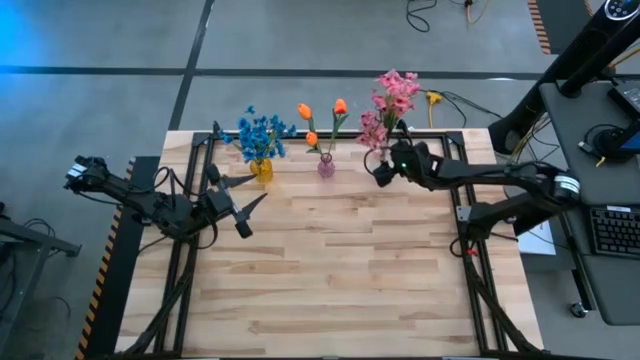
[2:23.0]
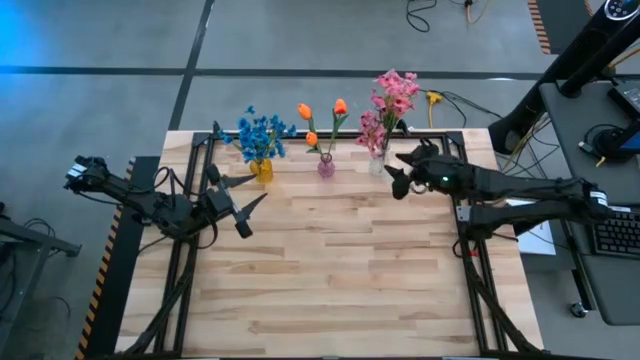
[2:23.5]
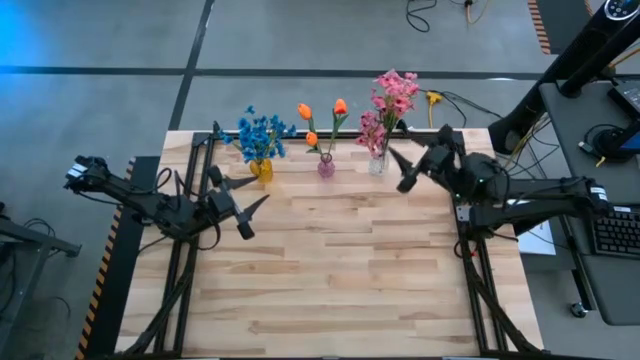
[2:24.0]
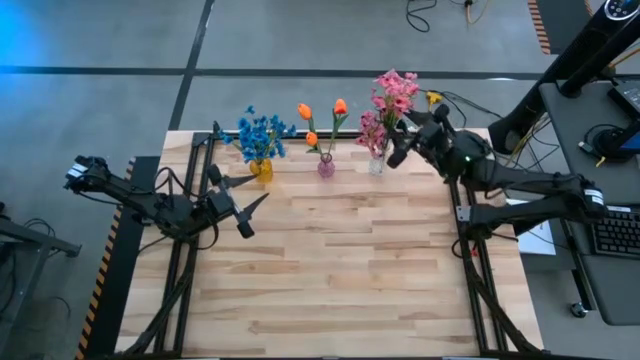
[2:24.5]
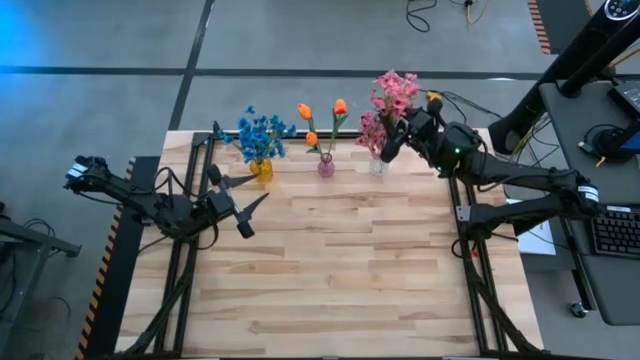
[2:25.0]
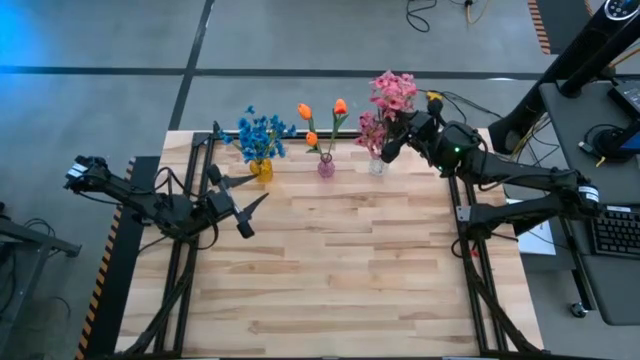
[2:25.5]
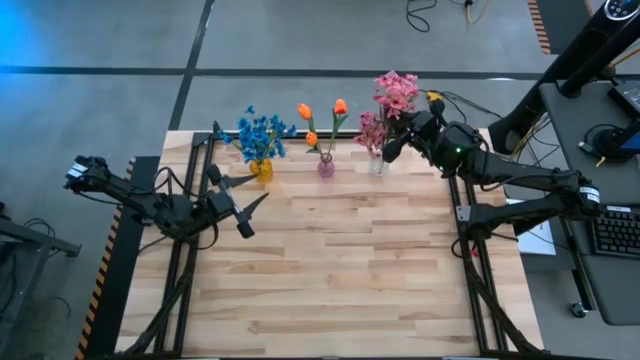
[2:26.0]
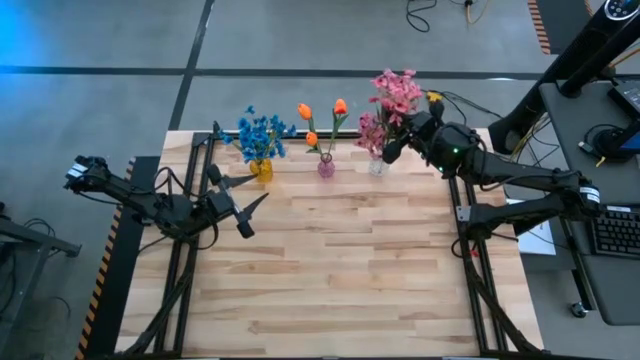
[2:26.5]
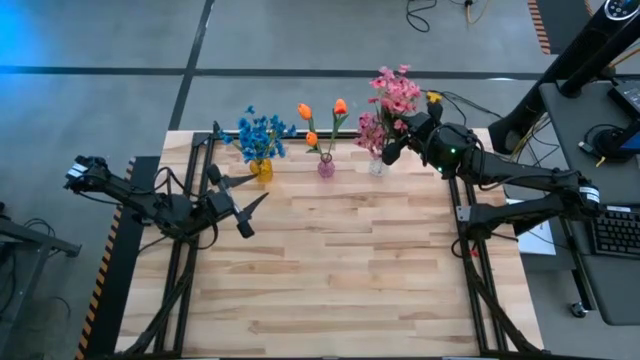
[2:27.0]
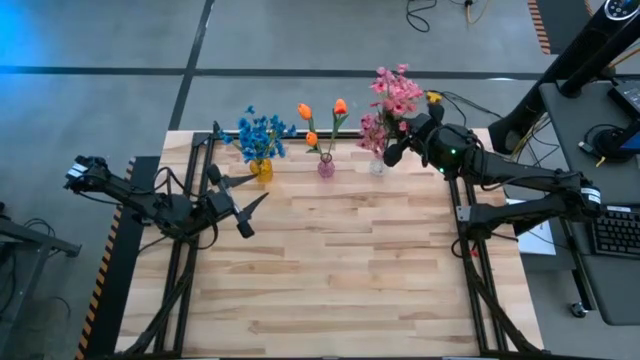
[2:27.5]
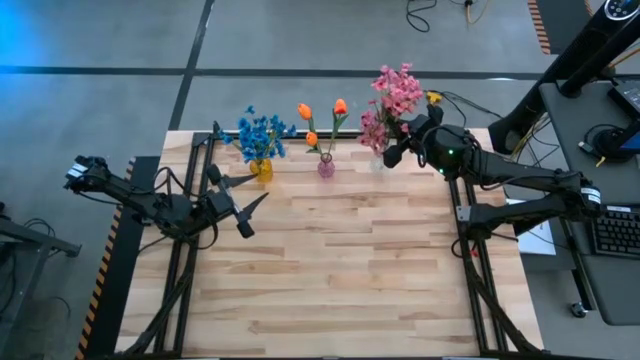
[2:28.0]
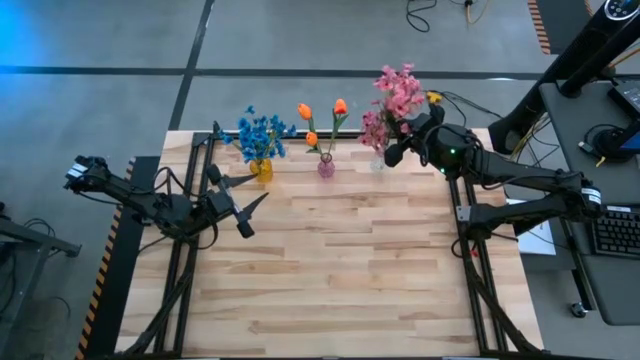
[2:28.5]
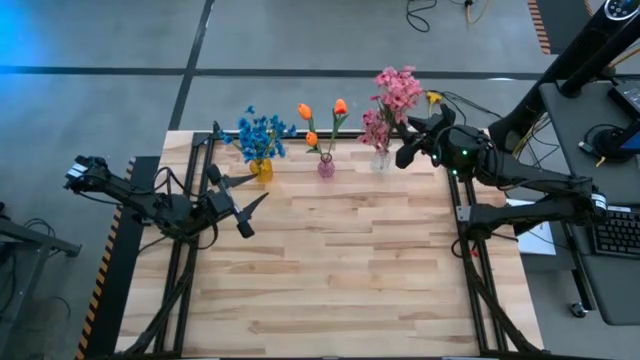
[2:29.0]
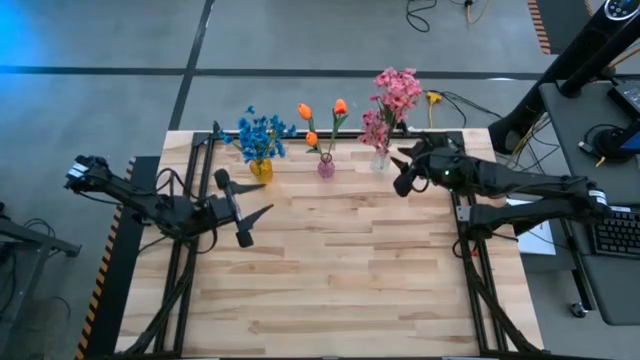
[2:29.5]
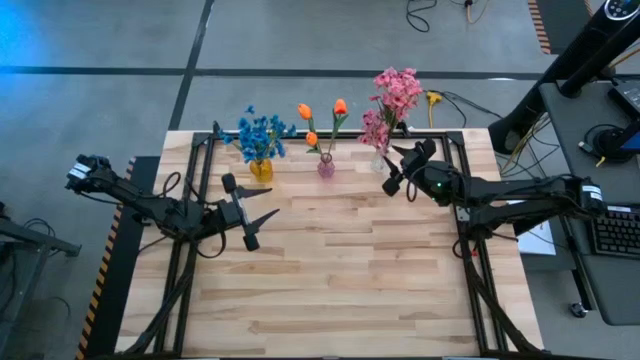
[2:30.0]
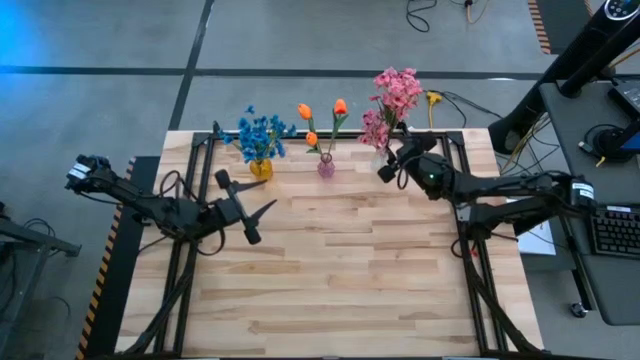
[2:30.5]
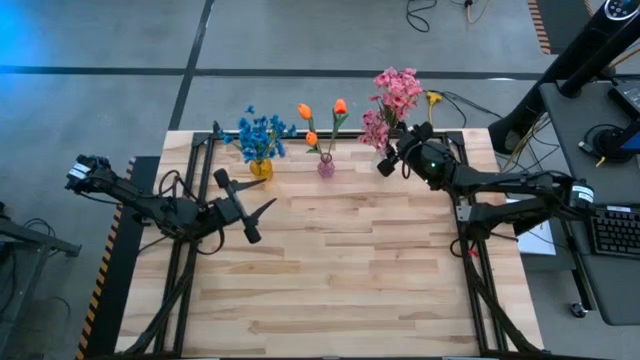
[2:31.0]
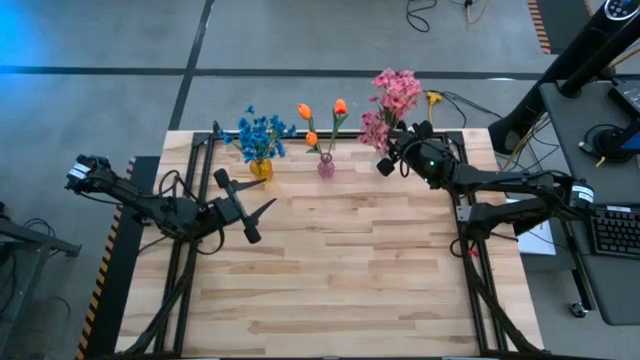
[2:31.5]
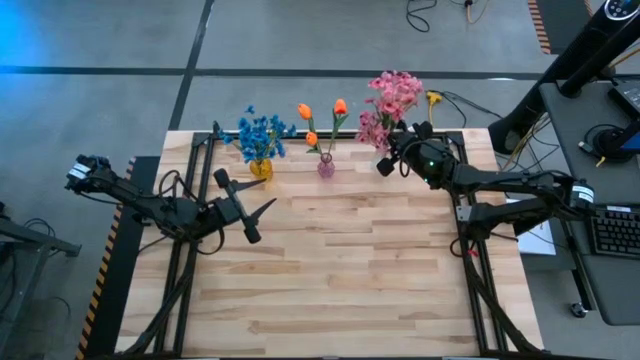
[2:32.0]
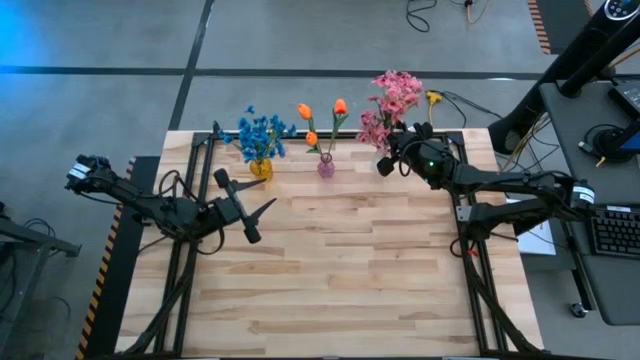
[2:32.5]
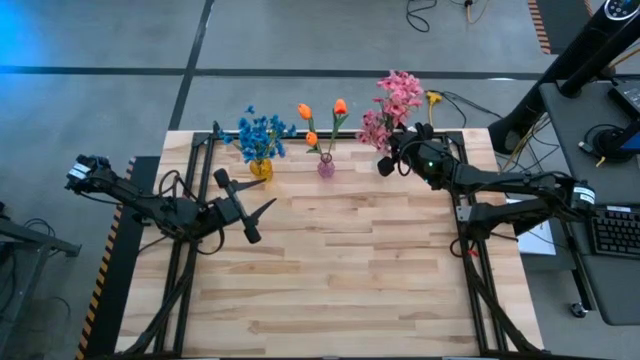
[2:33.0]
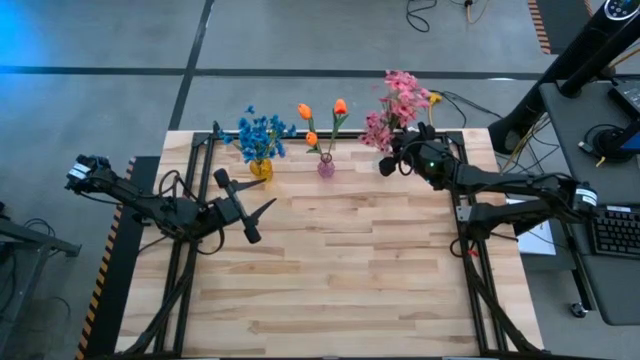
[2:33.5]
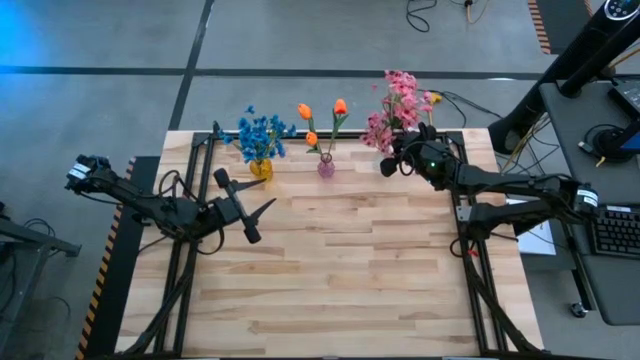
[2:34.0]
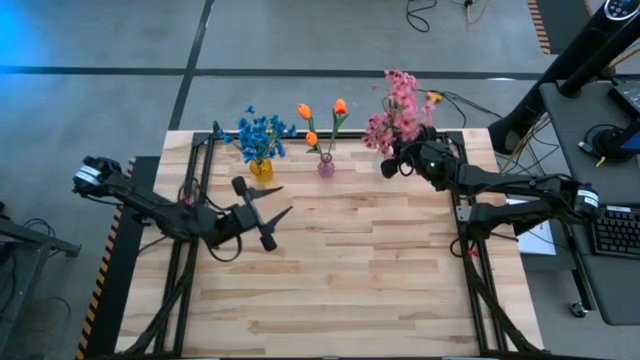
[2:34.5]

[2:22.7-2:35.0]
Task: Sort flowers into vase by color
Adjust the pink flowers

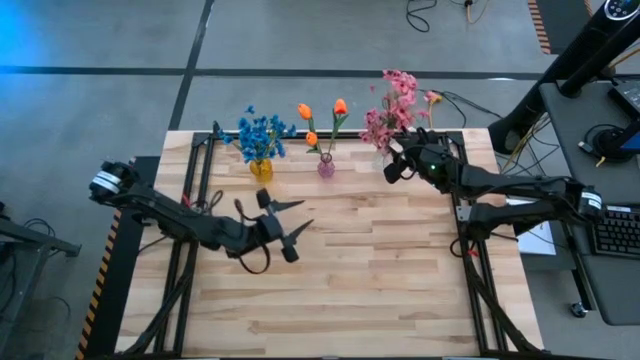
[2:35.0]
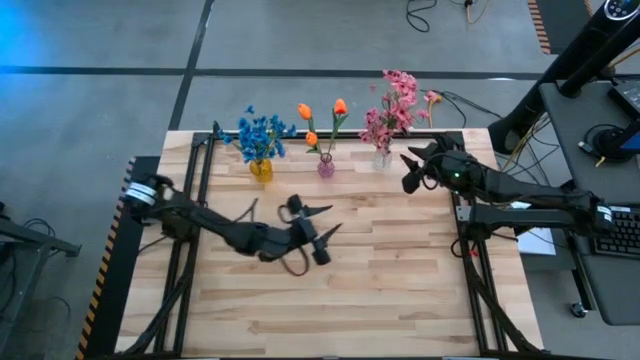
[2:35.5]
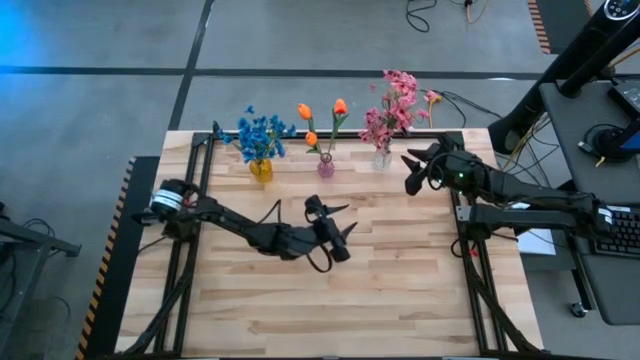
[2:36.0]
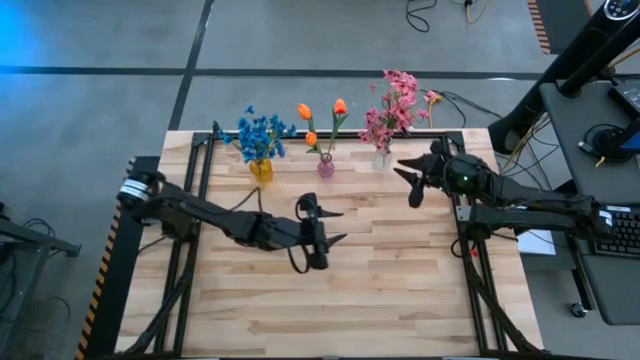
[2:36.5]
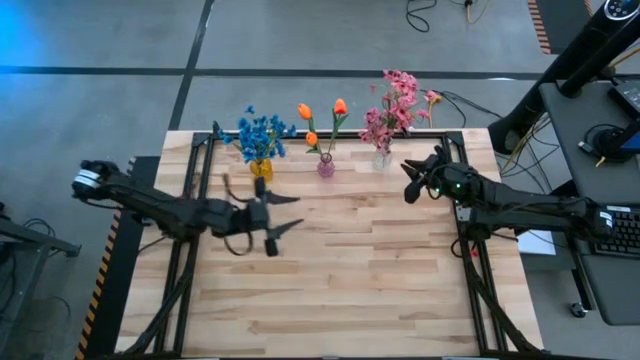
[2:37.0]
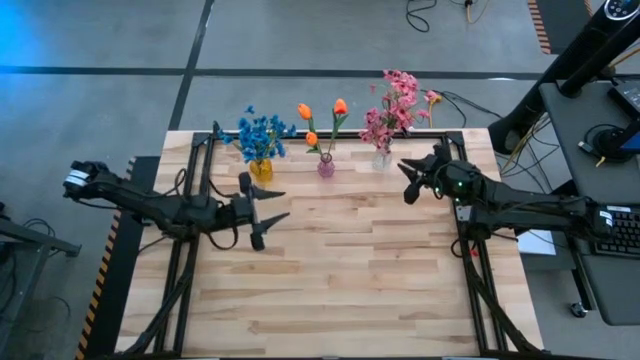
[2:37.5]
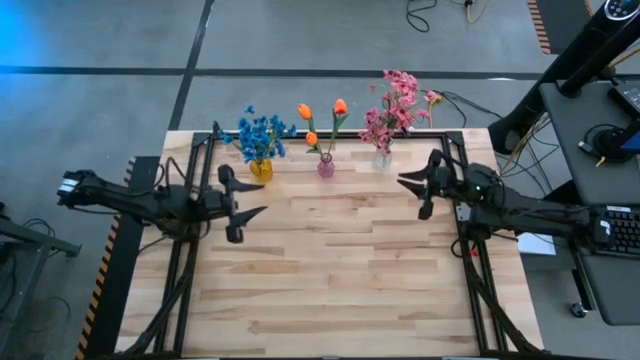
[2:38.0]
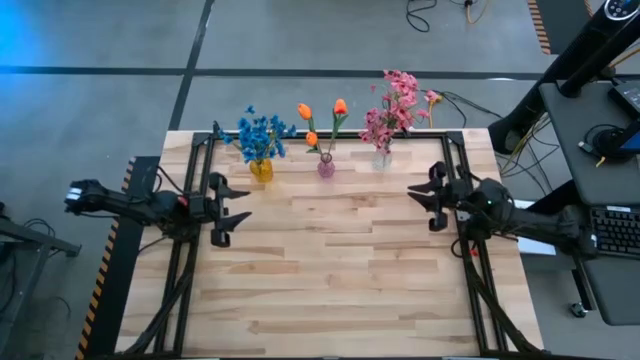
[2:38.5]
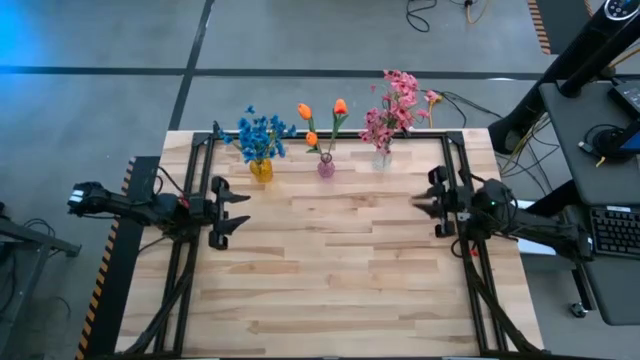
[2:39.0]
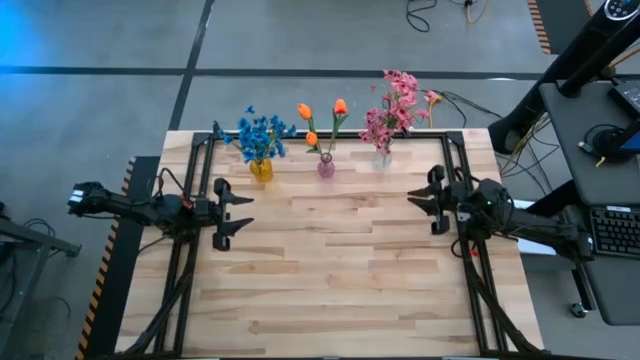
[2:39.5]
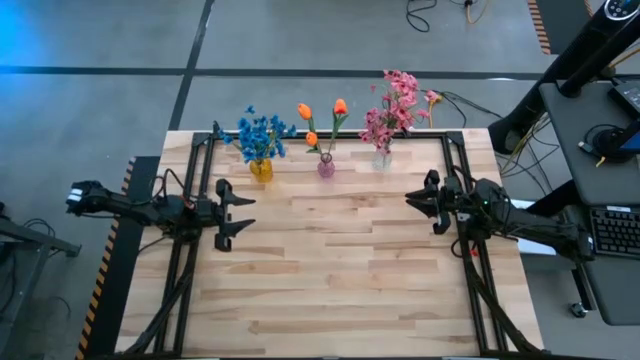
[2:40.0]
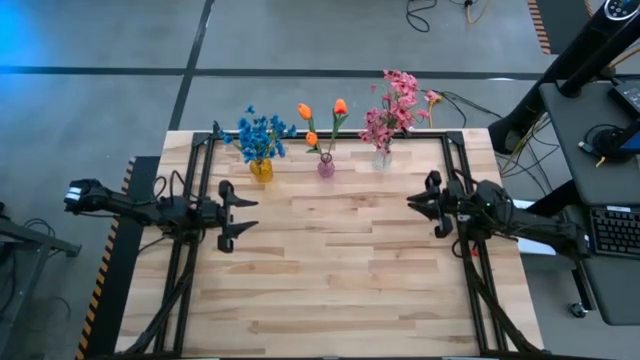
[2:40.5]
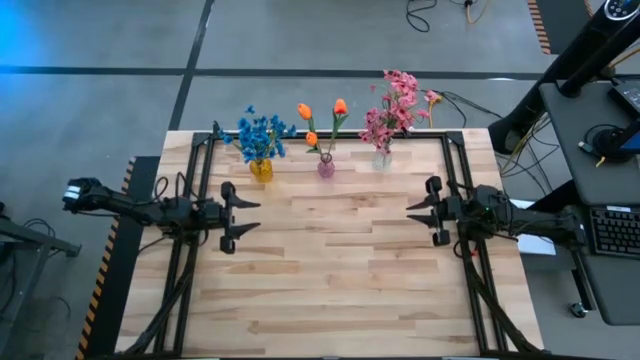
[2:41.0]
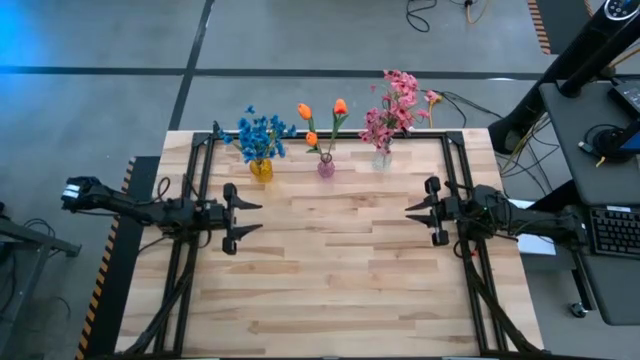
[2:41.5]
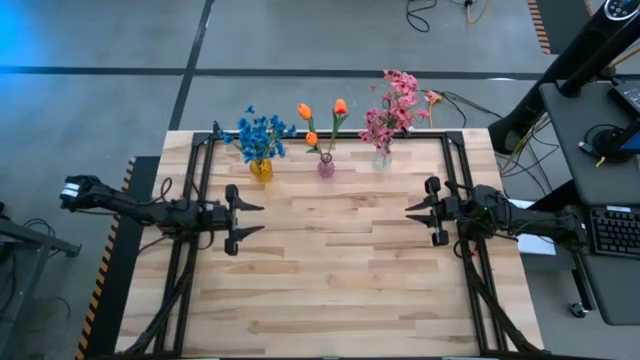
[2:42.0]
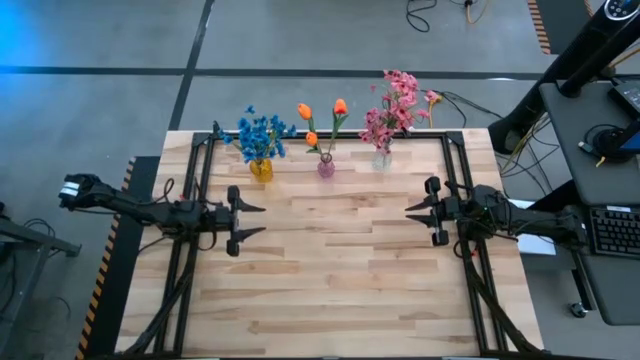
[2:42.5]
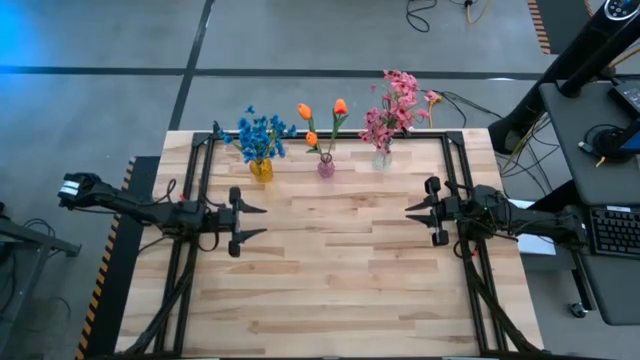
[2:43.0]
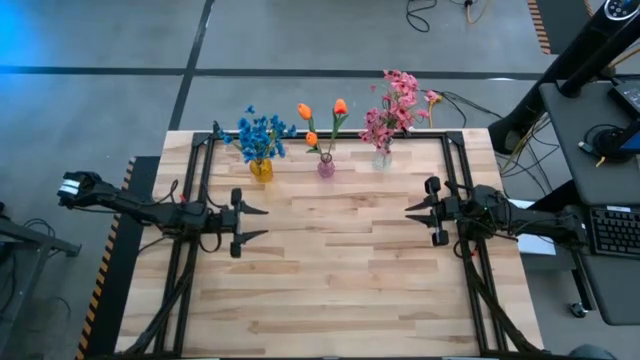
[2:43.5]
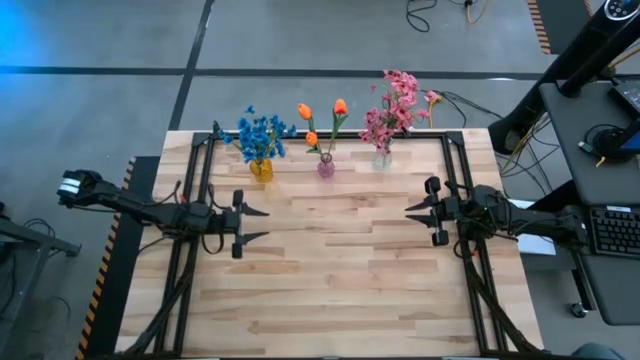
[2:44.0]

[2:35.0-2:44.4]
Return to Home Position
